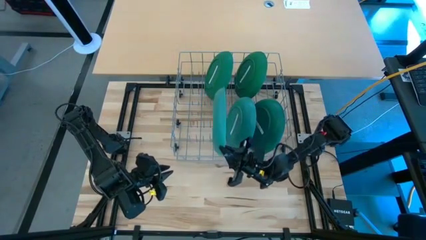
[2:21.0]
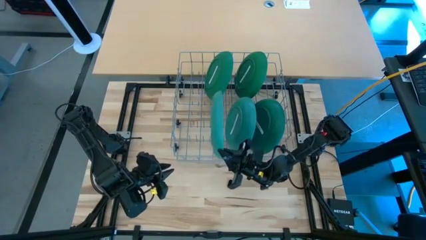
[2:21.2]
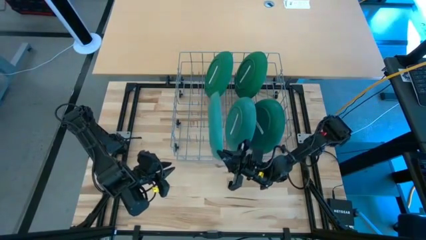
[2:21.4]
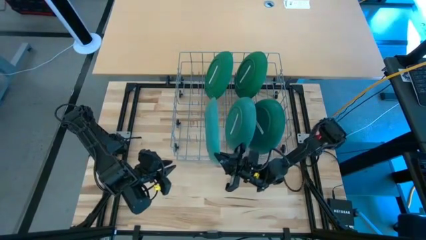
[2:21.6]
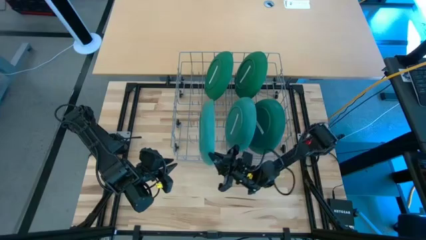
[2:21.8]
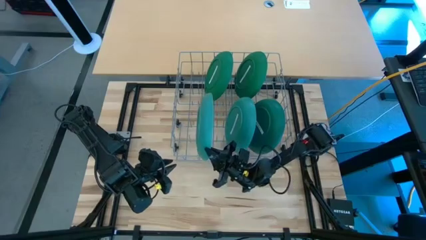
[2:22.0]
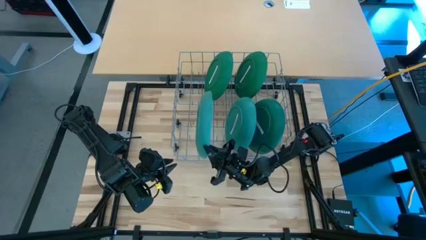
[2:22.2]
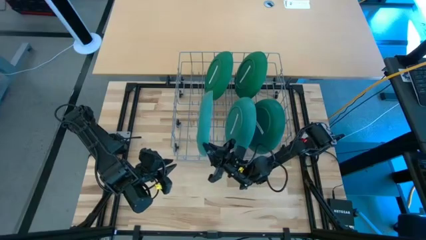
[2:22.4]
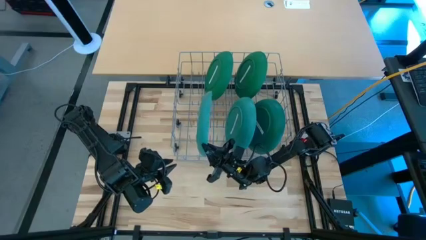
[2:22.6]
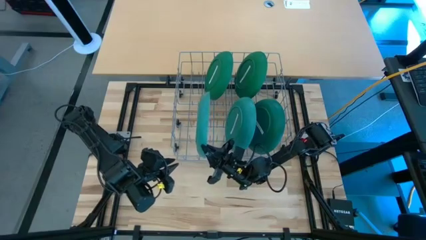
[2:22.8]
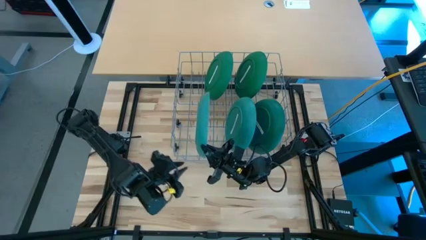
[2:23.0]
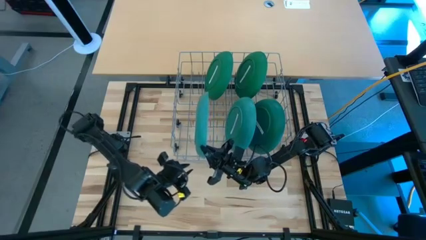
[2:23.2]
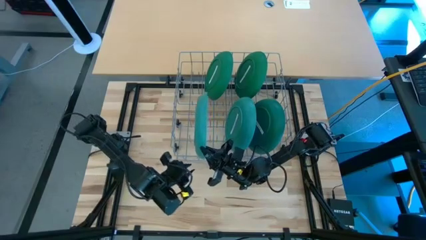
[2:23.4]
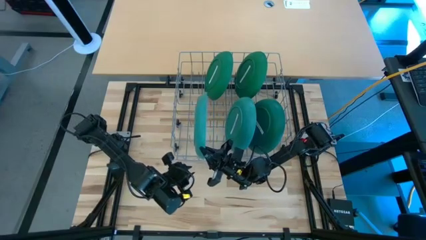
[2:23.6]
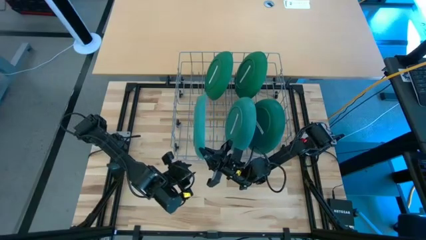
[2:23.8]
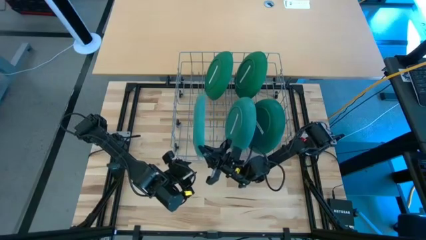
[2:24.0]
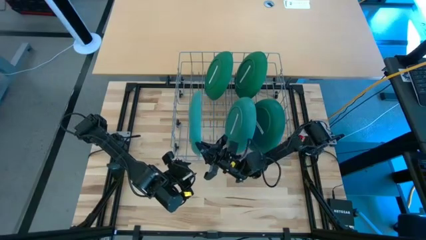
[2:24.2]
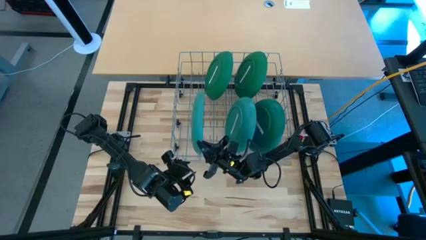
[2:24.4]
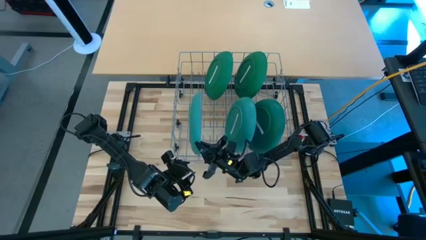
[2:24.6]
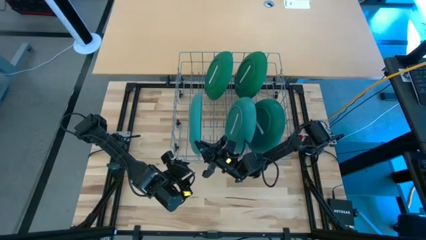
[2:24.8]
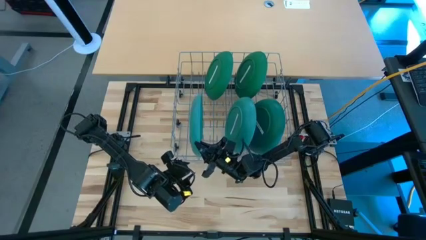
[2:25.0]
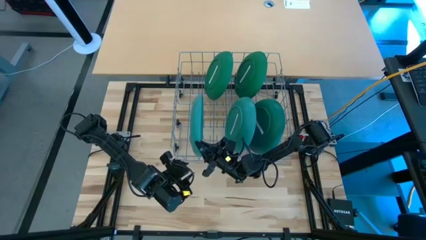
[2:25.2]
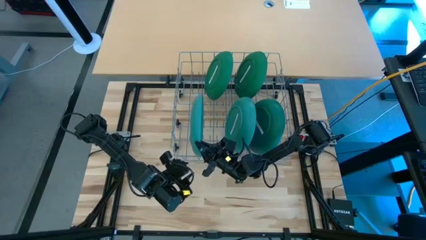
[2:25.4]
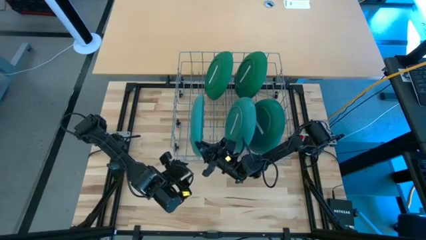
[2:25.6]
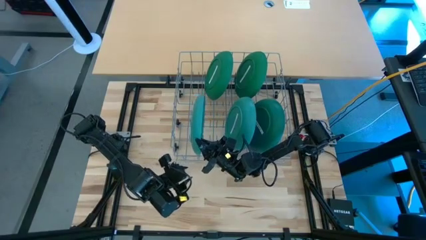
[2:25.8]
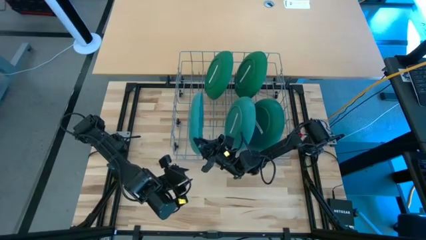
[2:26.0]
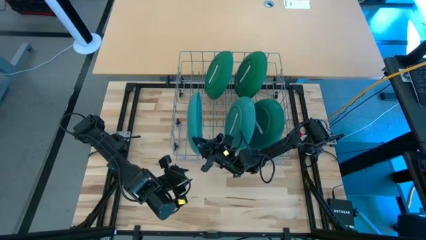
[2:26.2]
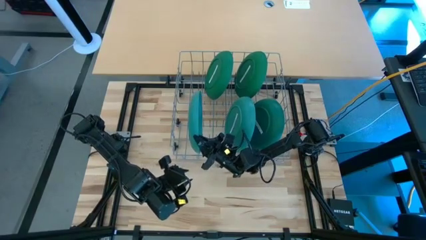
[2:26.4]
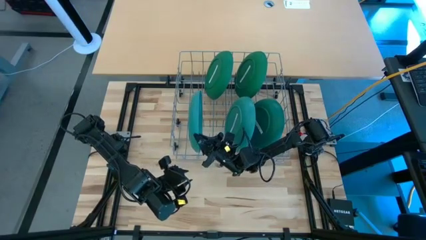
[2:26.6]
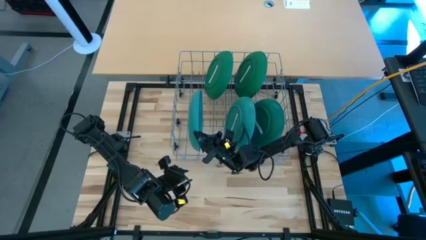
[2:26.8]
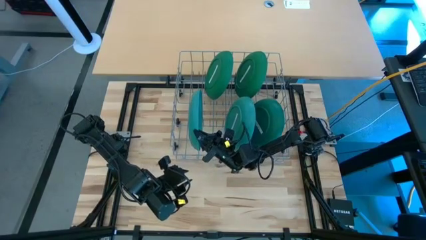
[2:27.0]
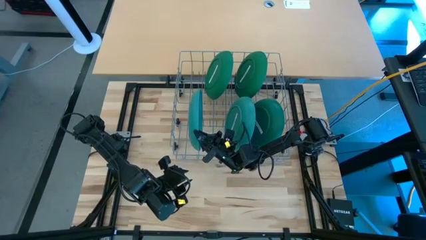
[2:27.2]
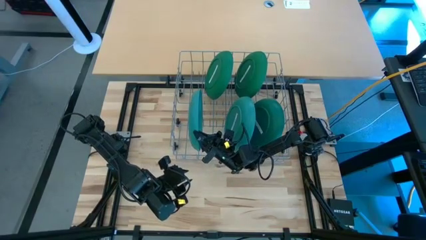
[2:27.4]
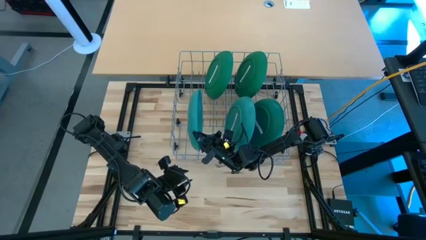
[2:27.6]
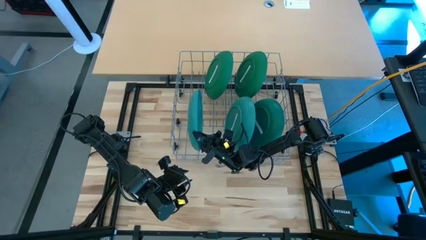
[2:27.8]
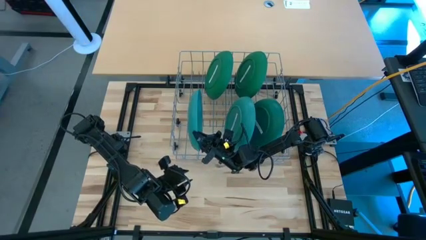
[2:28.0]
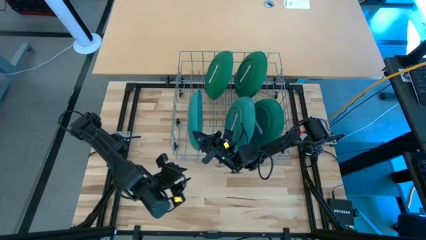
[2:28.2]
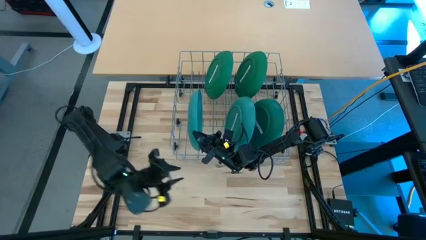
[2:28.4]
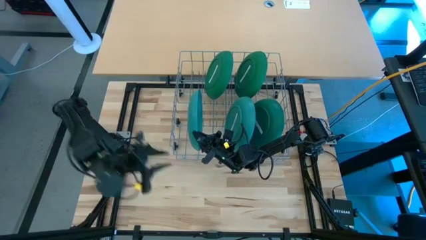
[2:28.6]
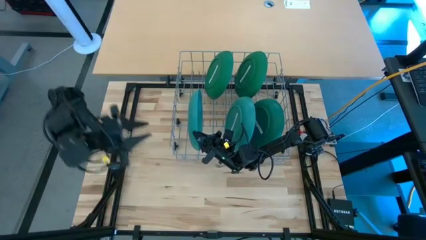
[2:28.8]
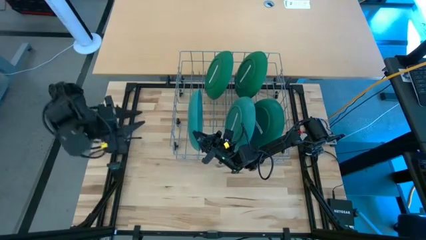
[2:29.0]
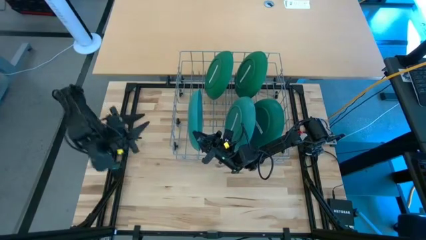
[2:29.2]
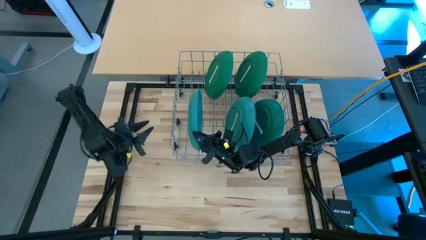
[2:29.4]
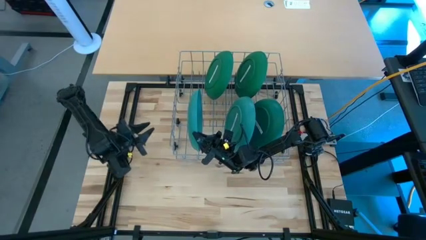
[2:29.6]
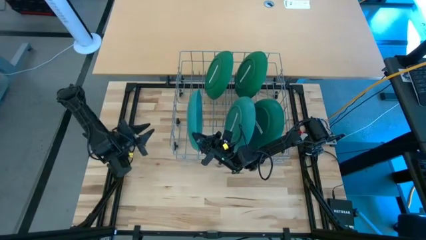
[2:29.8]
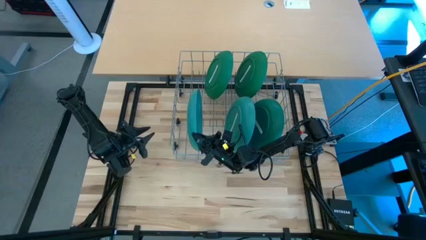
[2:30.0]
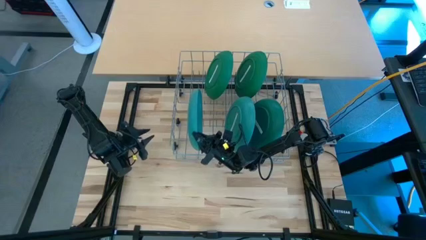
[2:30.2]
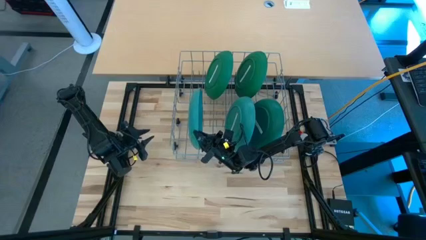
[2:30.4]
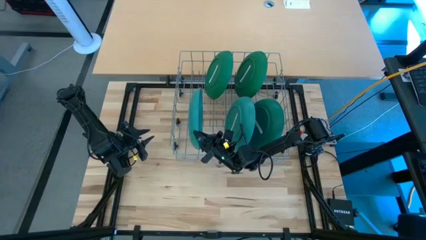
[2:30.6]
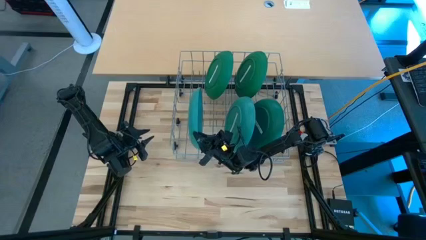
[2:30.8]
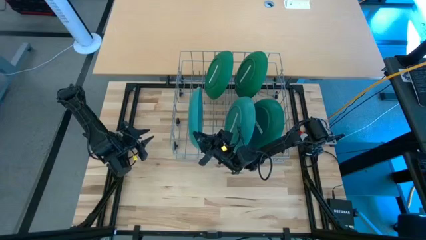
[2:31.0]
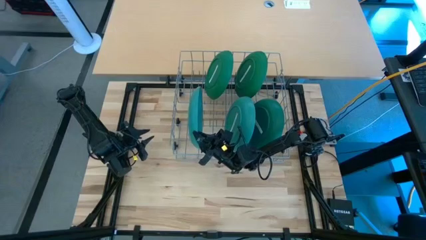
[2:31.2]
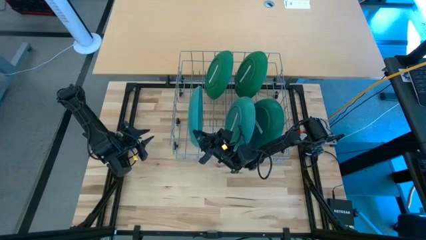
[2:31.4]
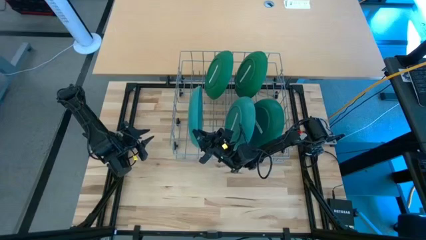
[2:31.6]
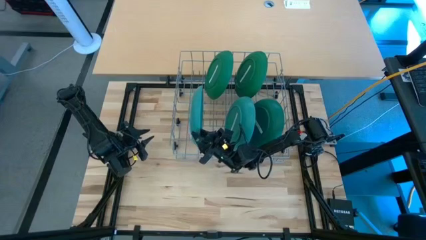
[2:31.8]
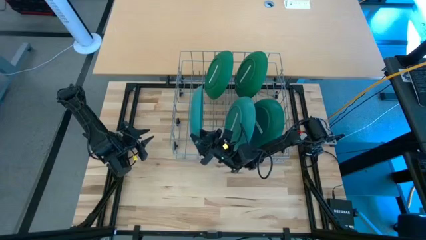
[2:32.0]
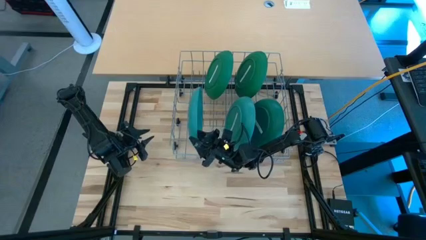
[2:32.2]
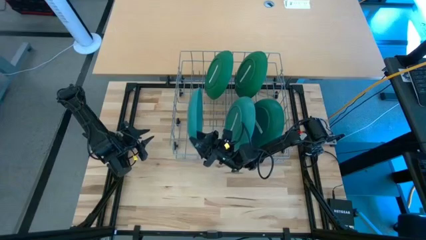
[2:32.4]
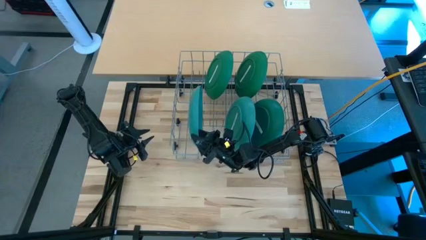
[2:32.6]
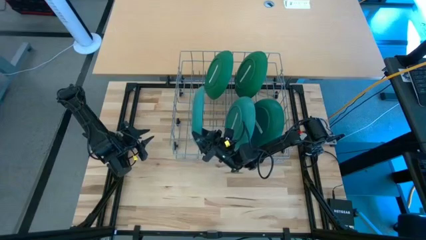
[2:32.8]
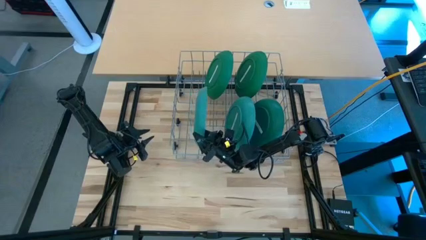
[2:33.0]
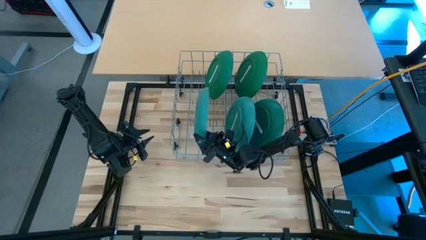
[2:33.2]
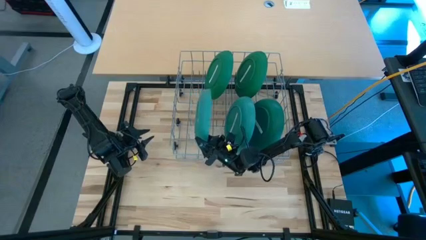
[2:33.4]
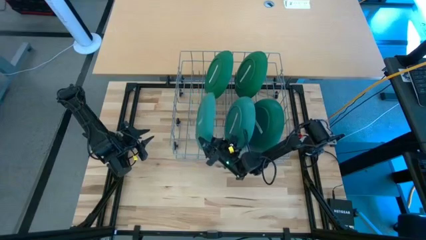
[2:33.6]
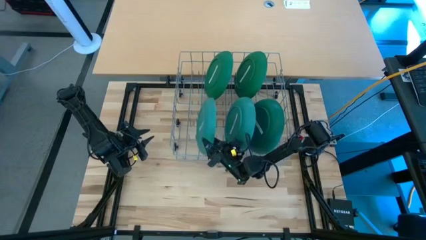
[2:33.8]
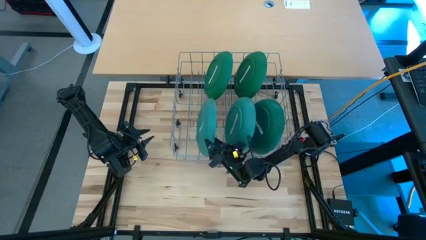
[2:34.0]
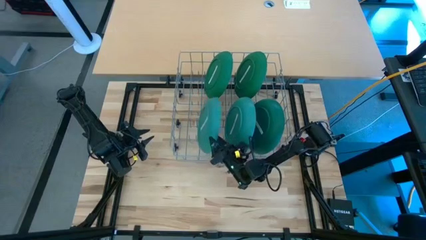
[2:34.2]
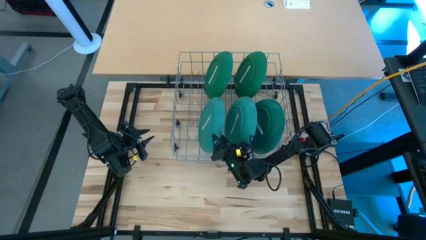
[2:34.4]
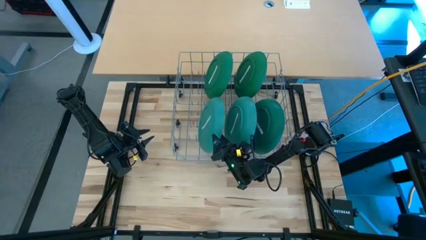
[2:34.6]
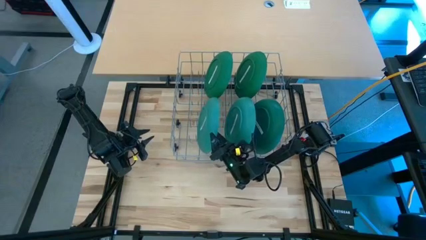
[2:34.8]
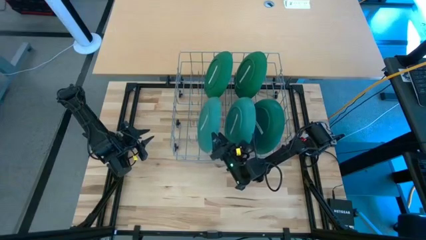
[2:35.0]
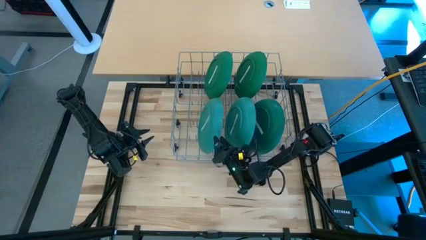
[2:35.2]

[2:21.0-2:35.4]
Task: Sort dishes
Put the blue plate into the dish rack
